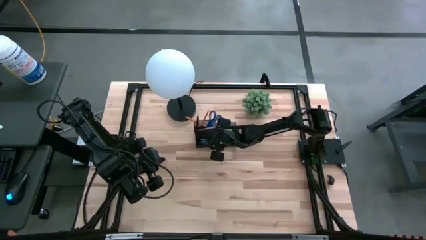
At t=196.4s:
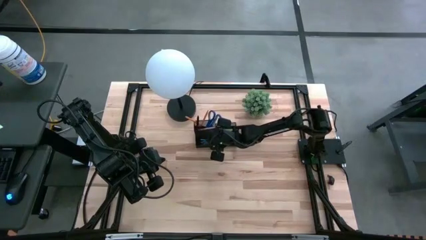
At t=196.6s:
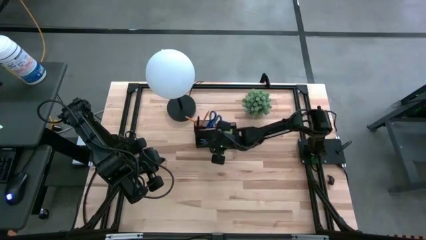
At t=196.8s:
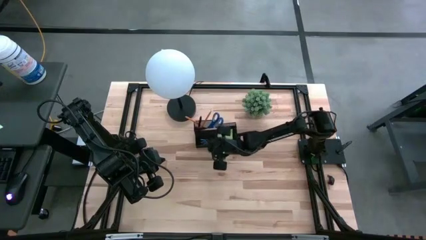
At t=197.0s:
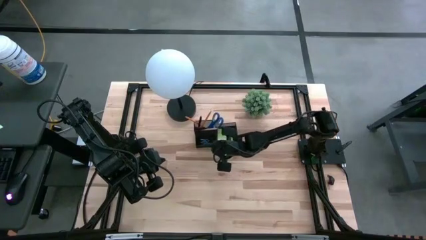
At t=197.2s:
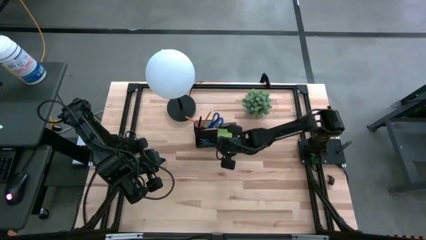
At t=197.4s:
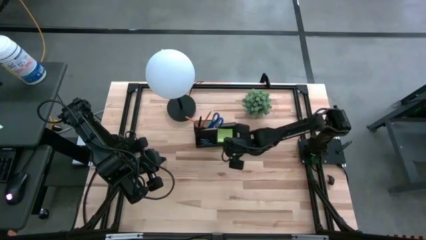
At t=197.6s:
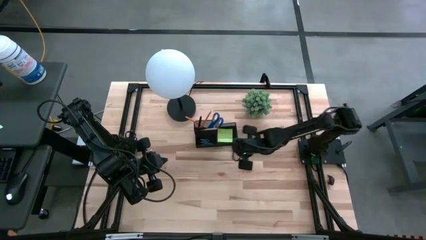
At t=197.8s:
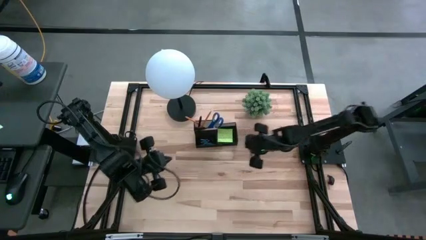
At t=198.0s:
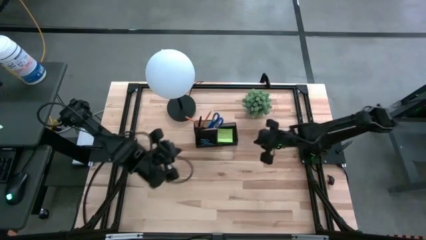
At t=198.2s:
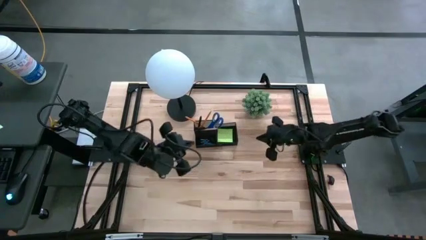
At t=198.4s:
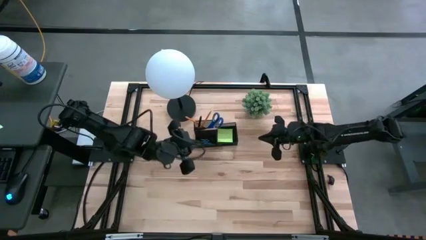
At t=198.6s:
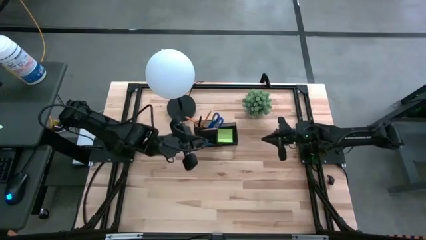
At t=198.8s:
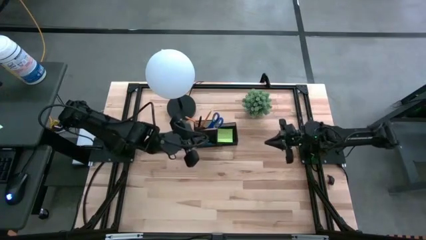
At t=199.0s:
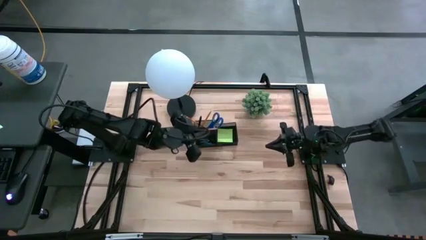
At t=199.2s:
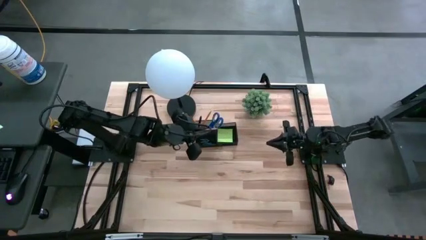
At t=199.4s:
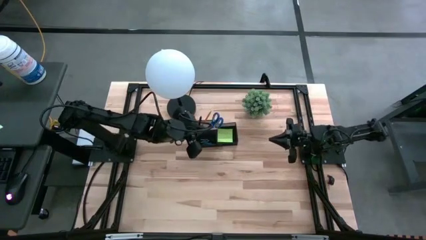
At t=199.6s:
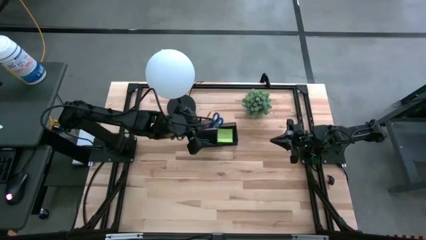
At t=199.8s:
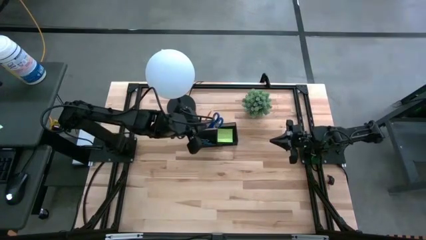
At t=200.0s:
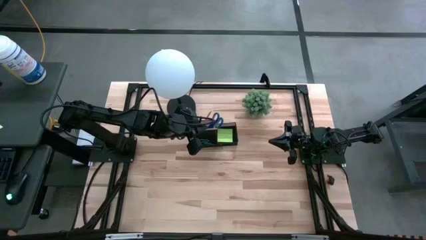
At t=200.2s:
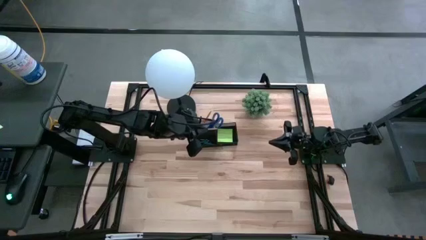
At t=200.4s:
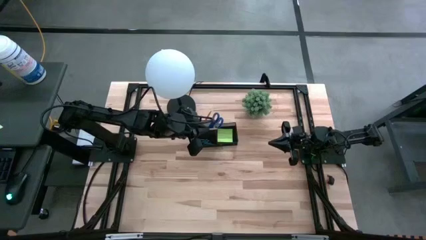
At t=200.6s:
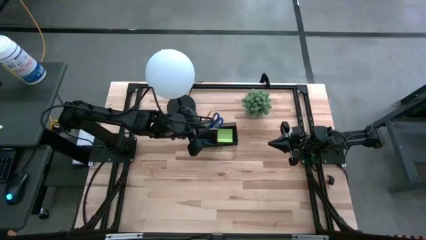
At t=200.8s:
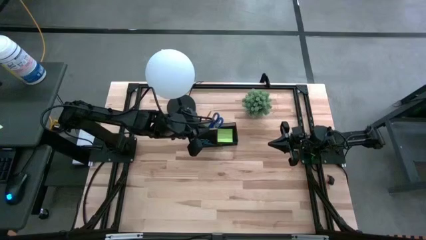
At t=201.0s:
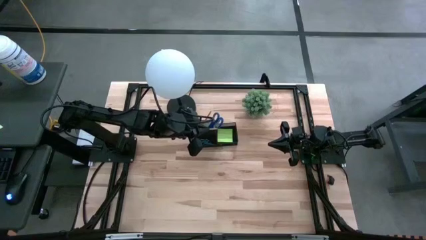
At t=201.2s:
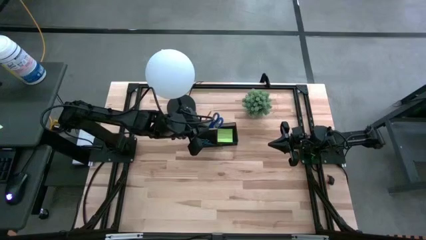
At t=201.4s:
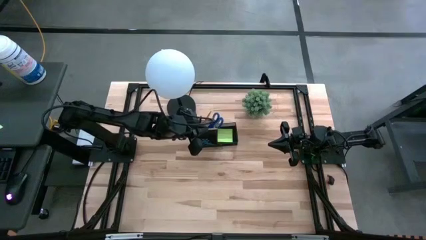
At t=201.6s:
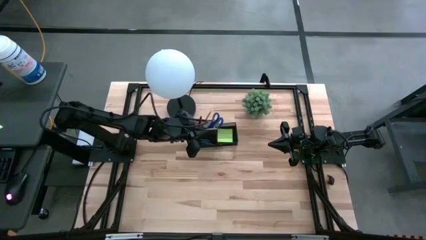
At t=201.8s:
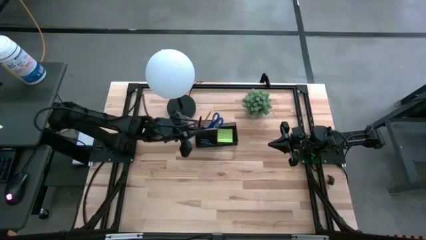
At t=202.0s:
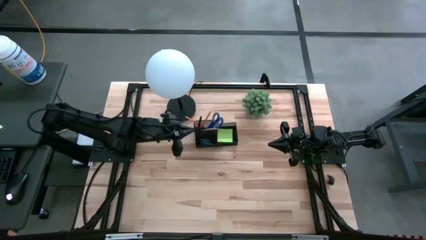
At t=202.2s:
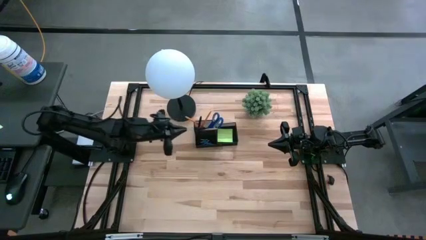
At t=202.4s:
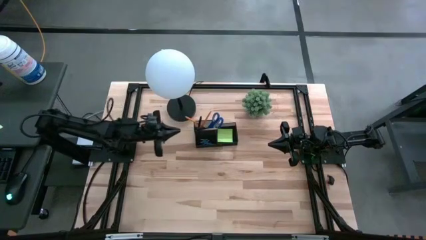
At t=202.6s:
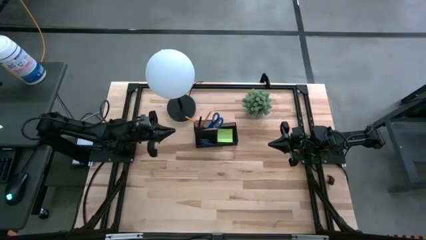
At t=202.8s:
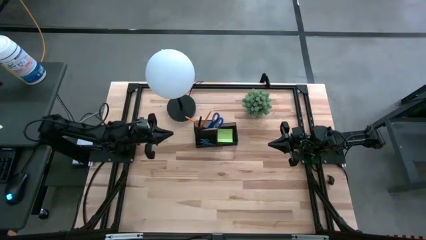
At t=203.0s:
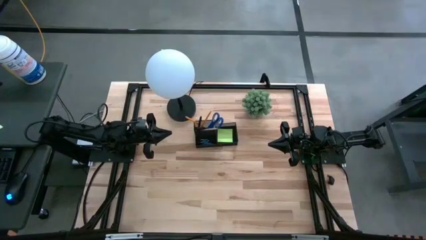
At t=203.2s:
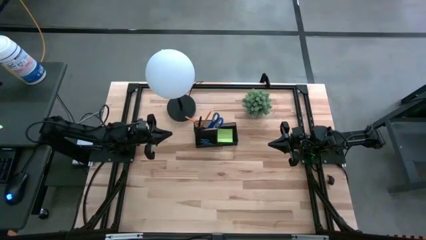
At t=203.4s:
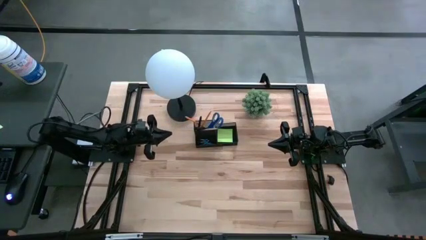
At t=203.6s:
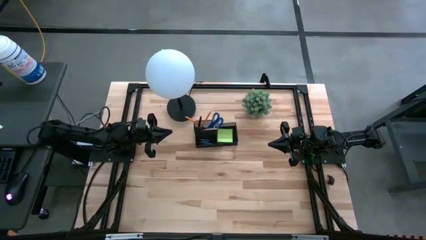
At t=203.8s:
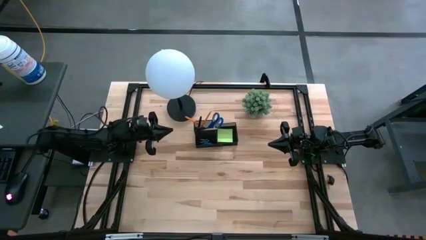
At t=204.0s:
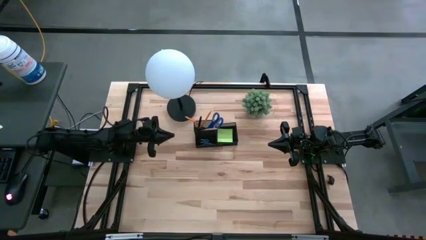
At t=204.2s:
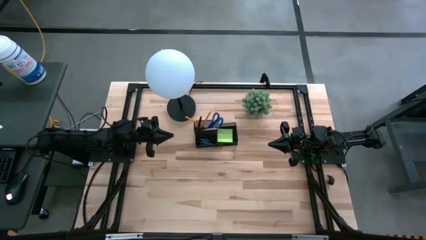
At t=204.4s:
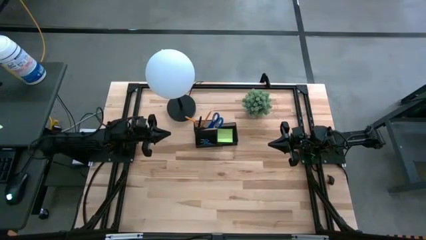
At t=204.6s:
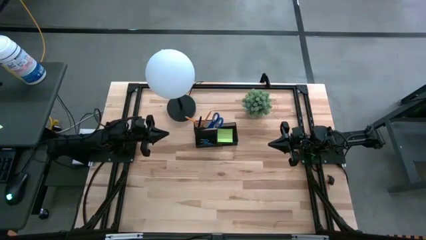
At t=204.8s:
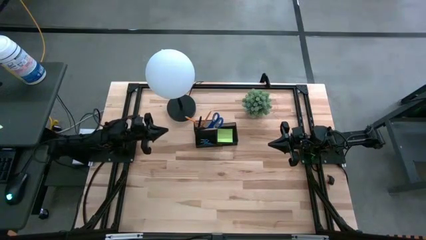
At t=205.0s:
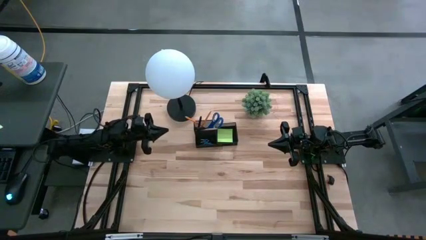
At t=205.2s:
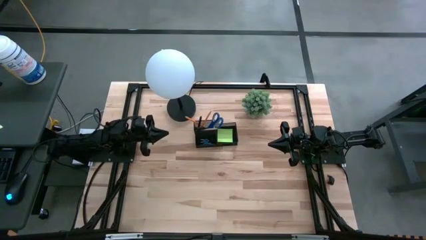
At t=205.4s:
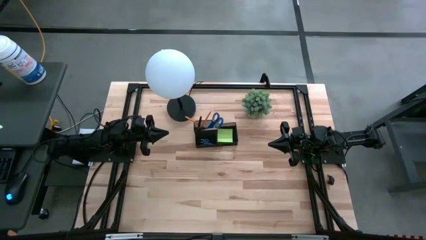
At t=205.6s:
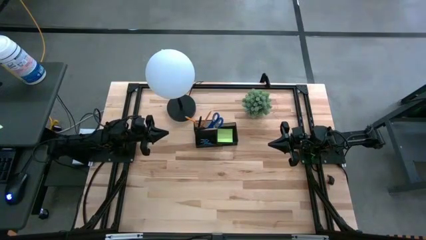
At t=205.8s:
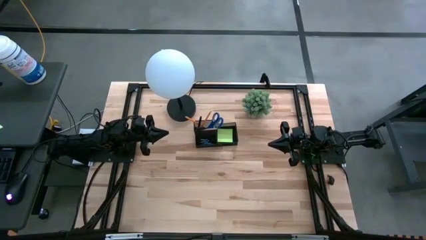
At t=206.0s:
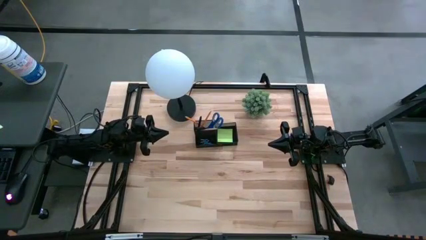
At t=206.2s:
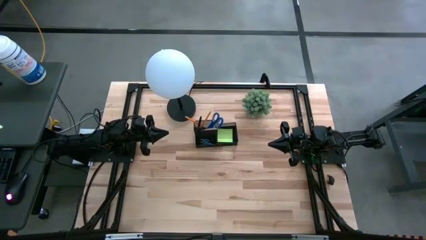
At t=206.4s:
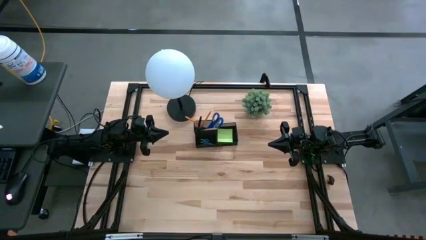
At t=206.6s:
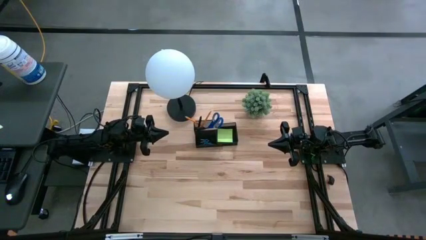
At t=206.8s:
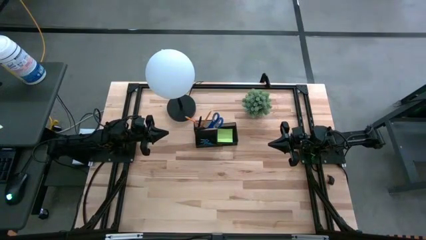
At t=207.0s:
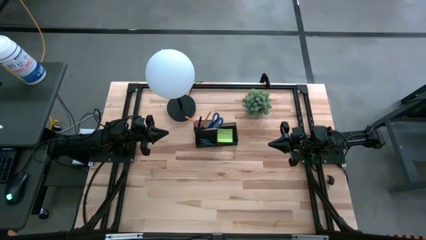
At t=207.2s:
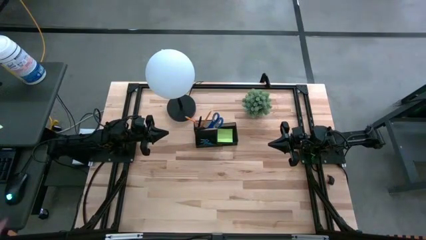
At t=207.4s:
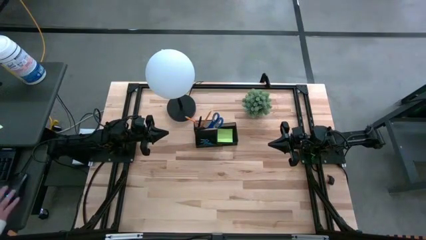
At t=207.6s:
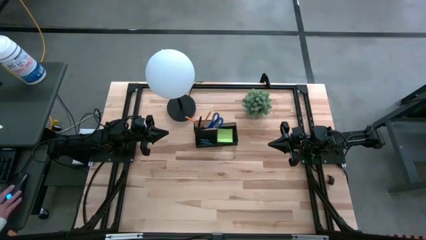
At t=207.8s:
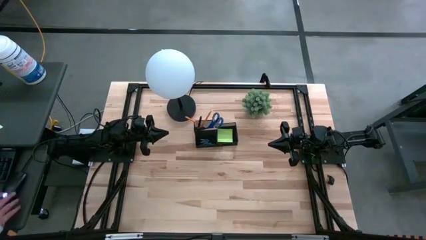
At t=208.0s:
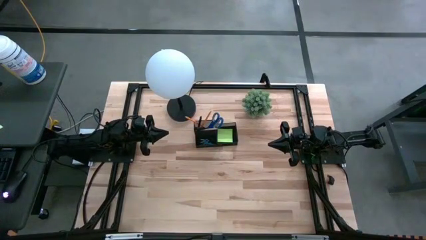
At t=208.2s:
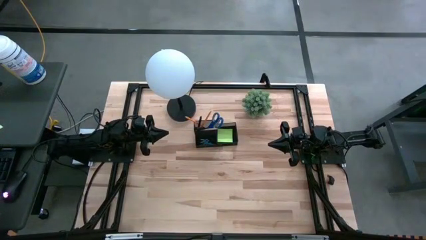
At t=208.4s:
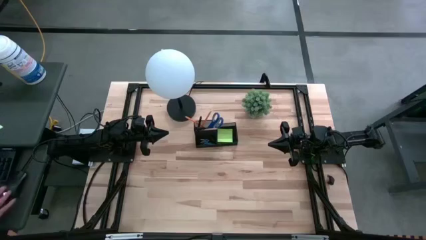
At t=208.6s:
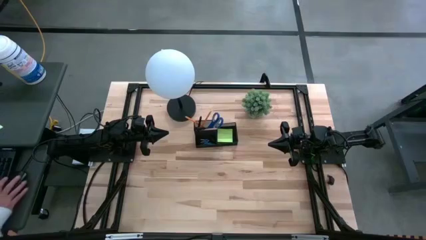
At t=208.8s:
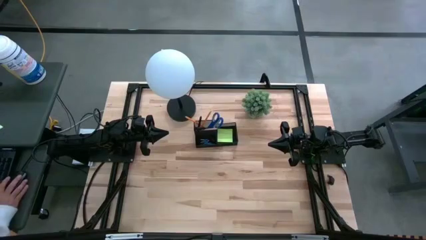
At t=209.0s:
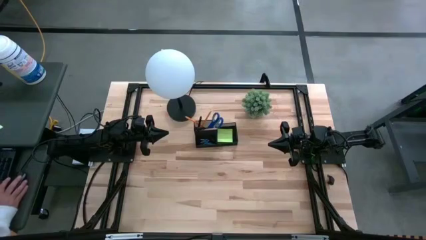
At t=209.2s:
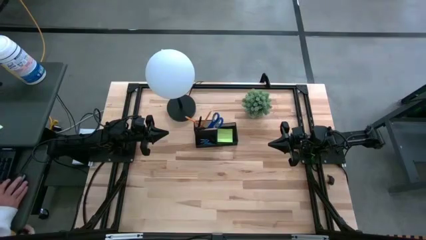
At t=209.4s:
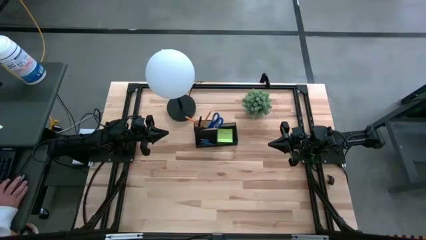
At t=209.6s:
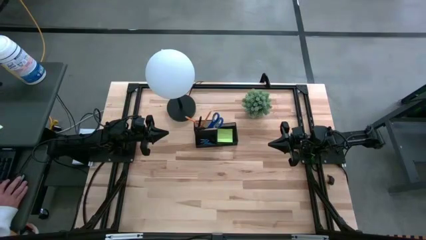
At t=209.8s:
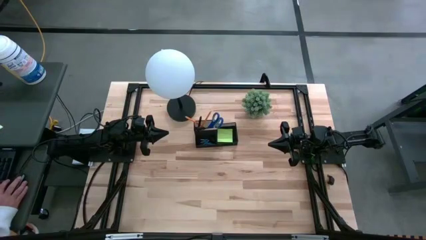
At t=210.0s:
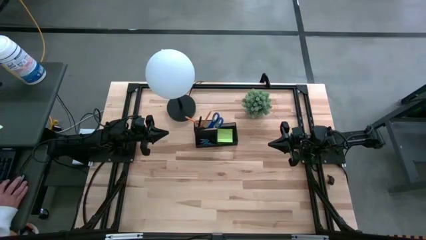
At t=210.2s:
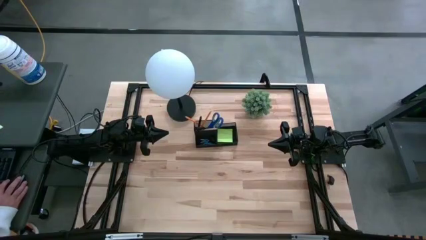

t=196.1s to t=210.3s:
Task: Pick and place office supplies into organizer
Return to Home Position
